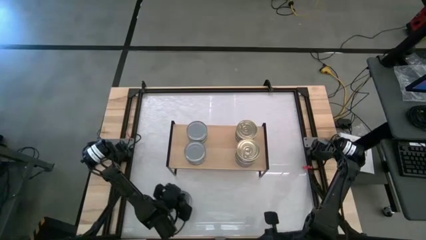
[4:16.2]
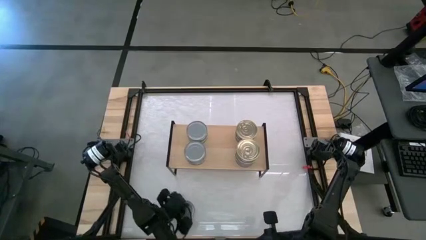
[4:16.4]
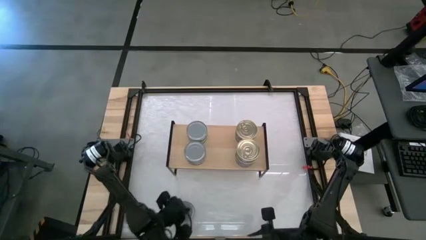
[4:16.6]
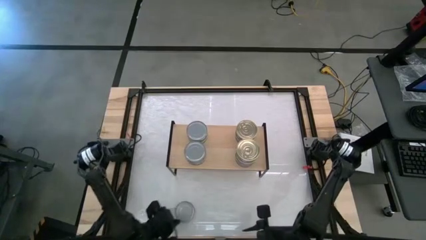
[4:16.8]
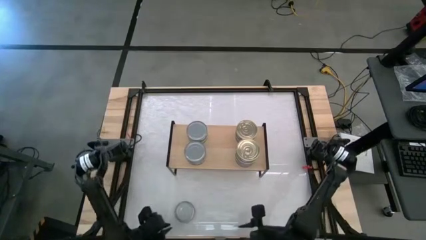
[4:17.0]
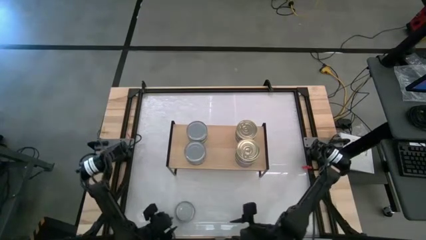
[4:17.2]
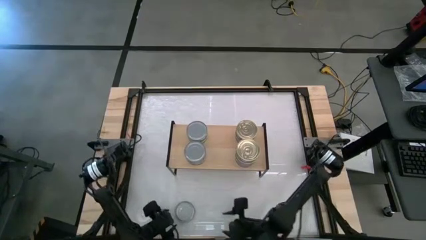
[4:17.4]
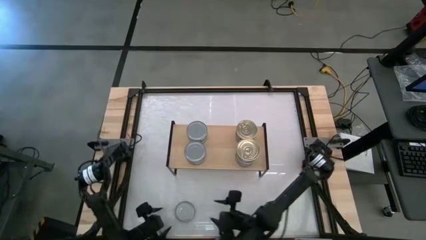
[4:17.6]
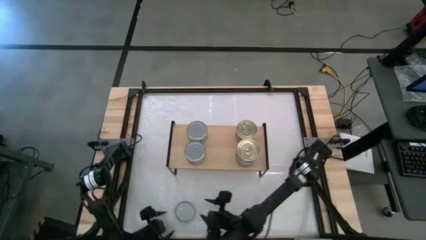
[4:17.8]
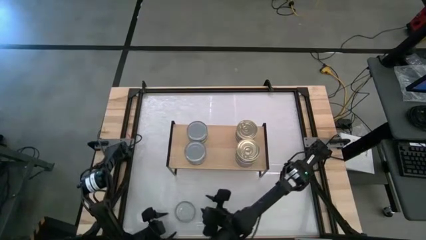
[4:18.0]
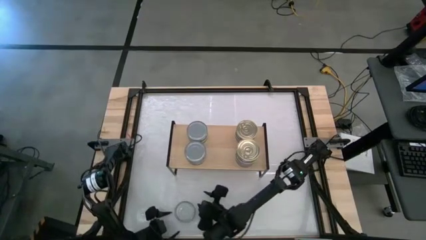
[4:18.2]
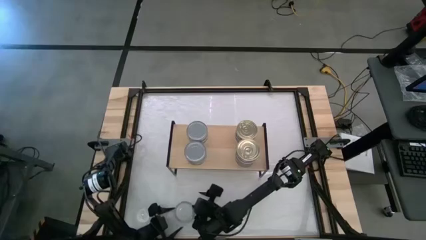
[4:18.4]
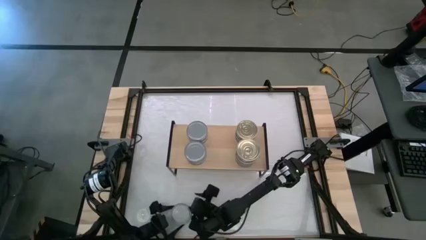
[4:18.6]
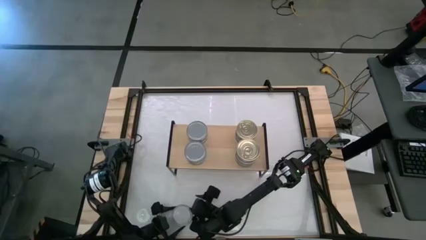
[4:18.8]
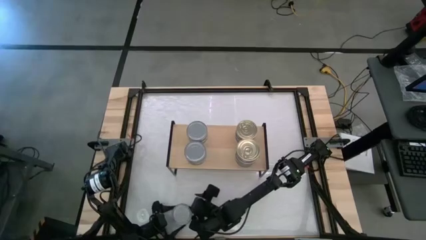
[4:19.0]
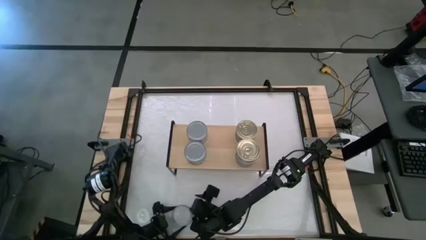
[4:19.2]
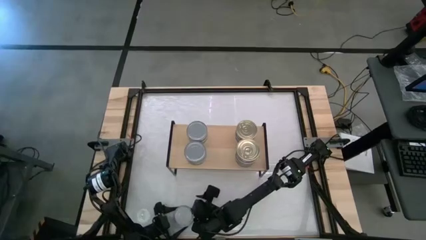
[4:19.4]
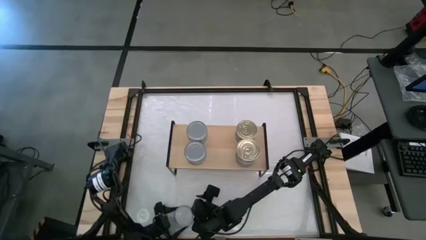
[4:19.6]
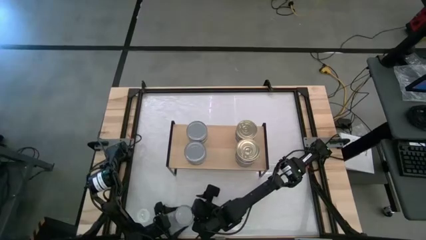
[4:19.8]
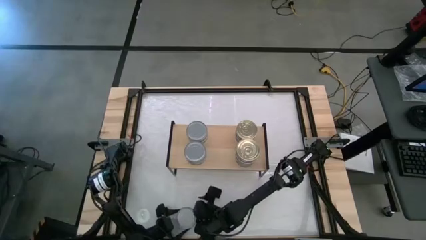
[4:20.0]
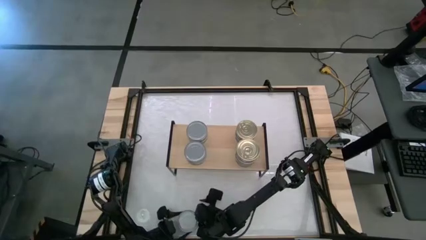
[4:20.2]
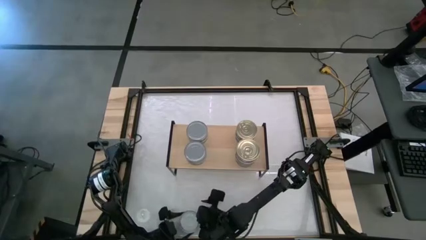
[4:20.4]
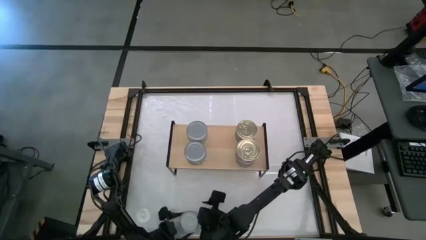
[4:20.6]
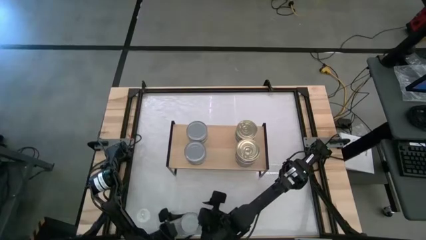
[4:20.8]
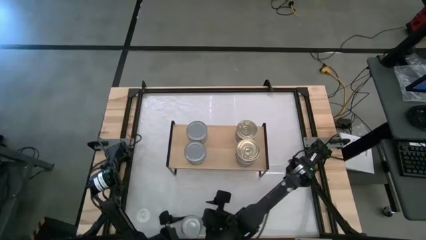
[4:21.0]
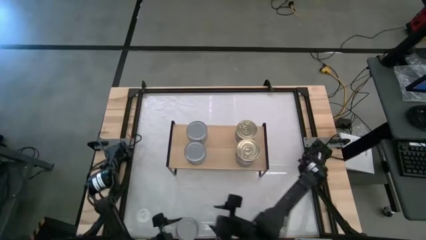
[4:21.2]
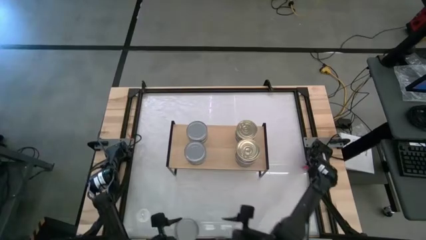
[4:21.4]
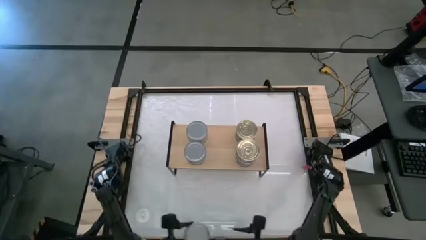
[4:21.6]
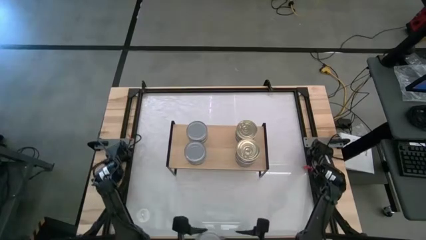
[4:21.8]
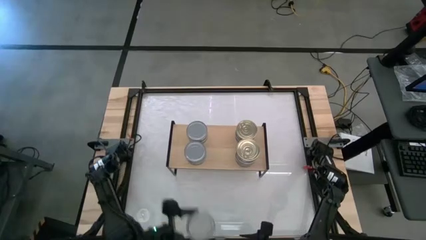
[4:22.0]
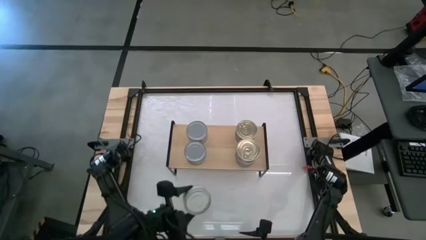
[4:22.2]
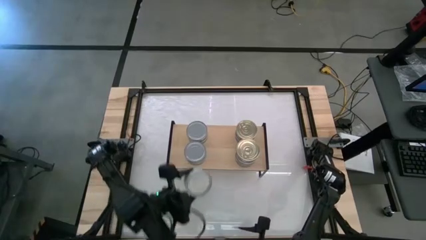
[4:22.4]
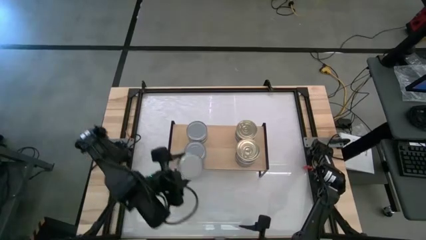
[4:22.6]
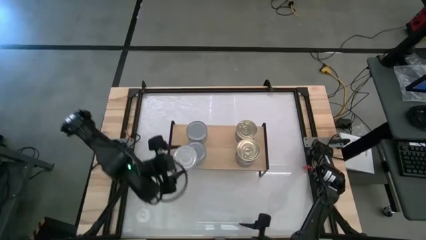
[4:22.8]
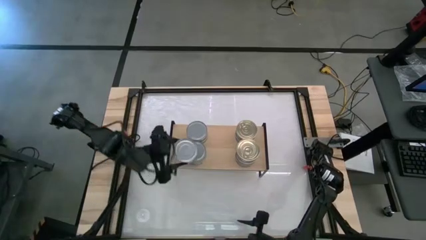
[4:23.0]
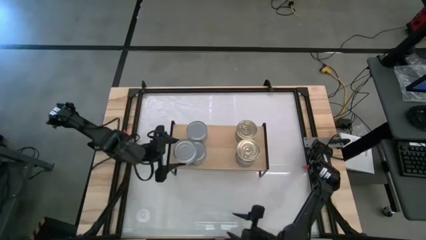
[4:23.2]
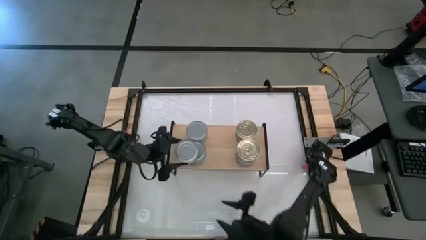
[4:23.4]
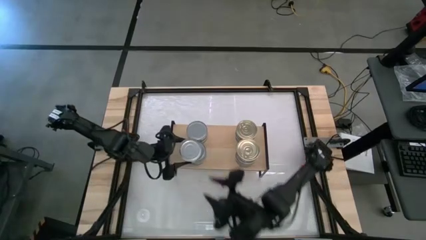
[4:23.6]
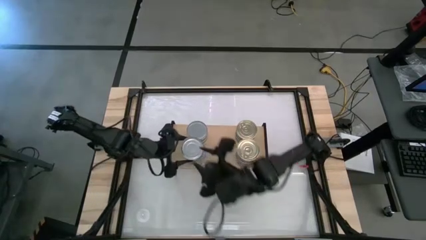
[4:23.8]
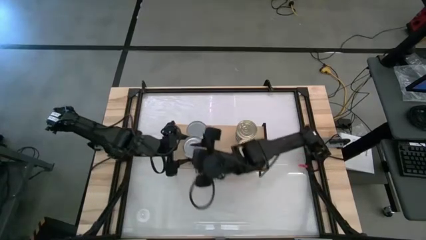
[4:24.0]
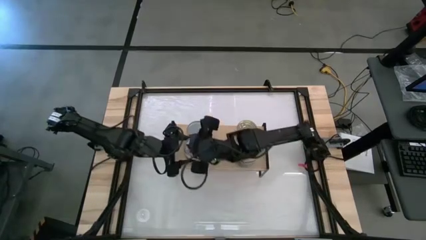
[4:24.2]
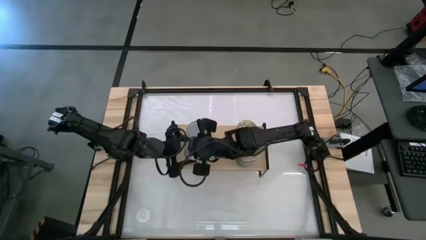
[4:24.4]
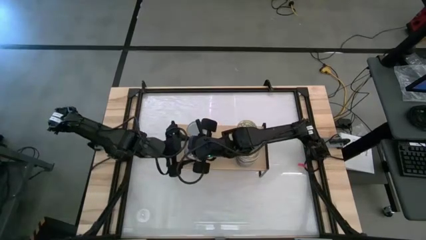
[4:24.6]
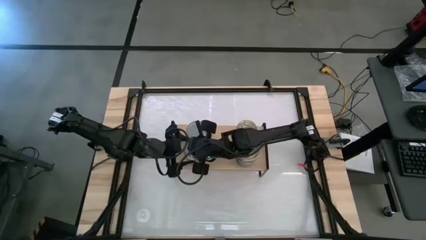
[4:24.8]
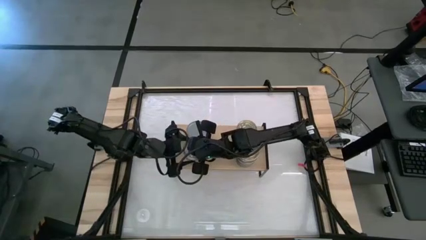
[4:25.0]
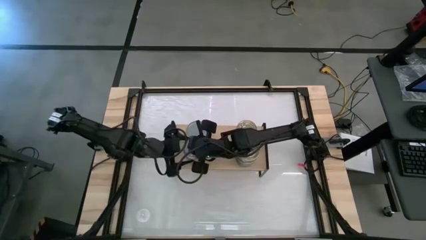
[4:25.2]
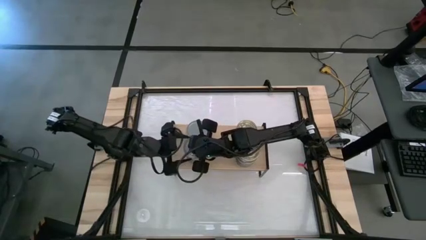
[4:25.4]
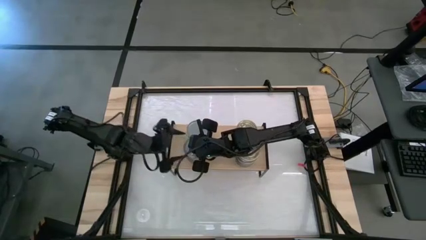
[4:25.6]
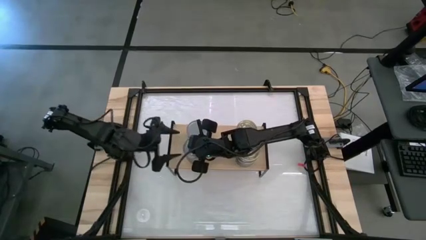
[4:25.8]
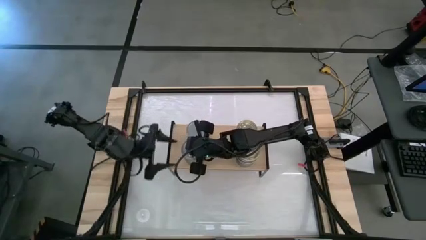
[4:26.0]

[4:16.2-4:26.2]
Task: Stack canned seafood by type on shelf
Stack the green tuna can on top of the other green tuna can on the shelf

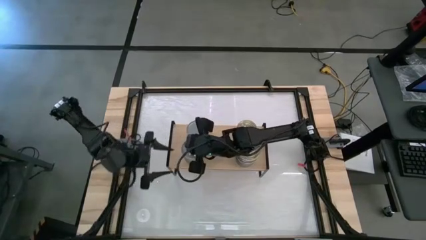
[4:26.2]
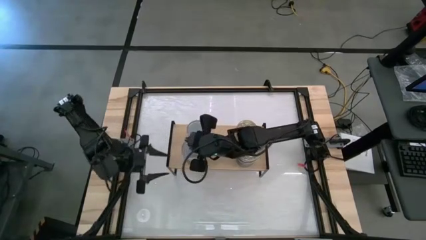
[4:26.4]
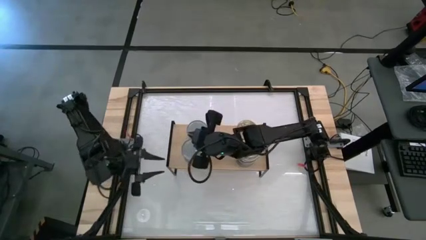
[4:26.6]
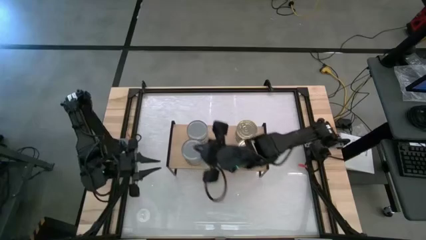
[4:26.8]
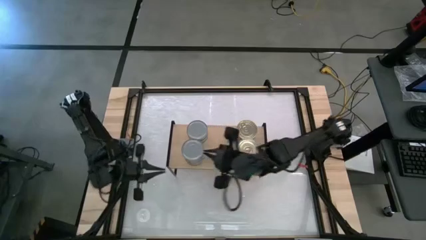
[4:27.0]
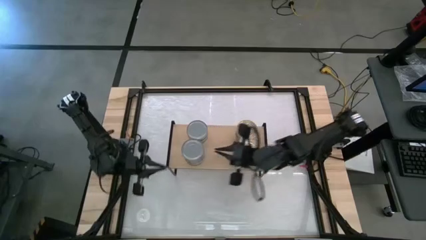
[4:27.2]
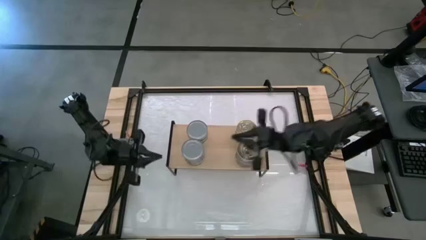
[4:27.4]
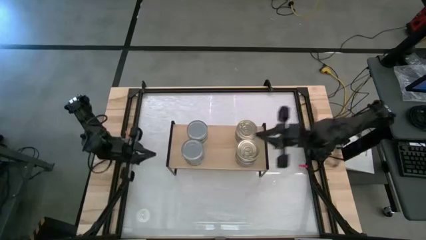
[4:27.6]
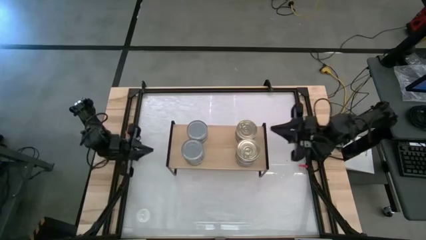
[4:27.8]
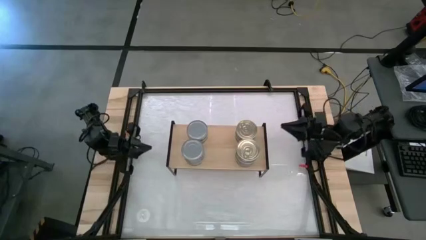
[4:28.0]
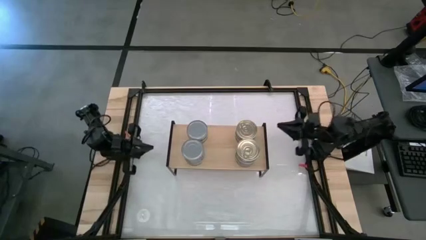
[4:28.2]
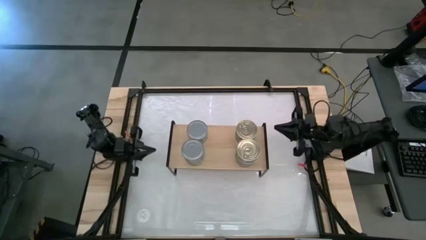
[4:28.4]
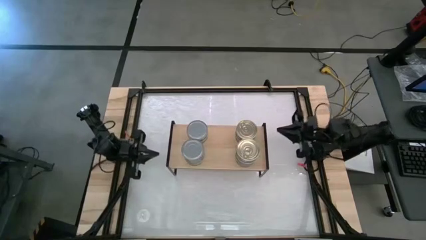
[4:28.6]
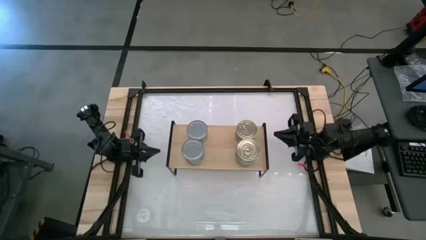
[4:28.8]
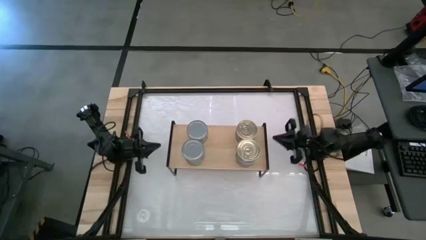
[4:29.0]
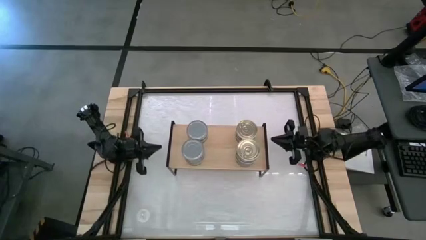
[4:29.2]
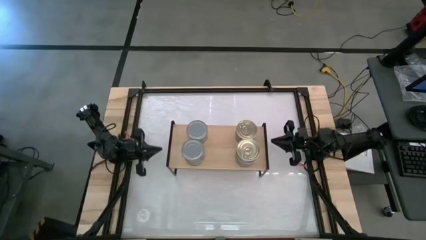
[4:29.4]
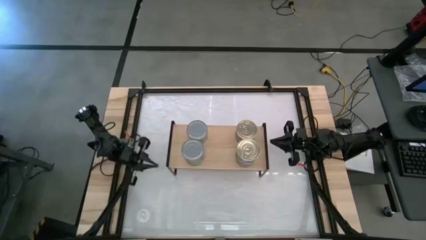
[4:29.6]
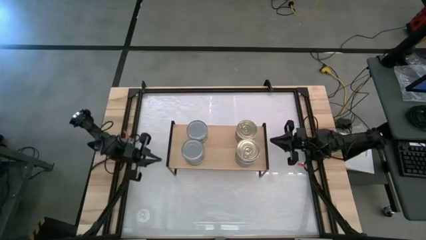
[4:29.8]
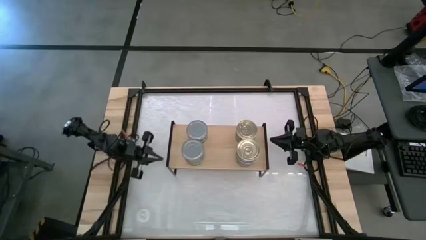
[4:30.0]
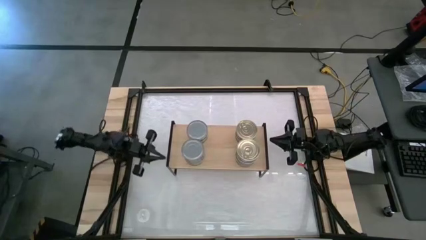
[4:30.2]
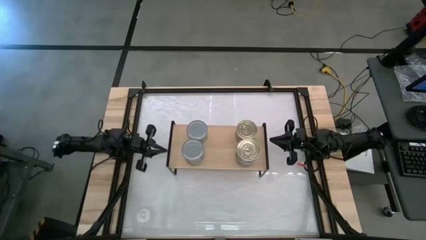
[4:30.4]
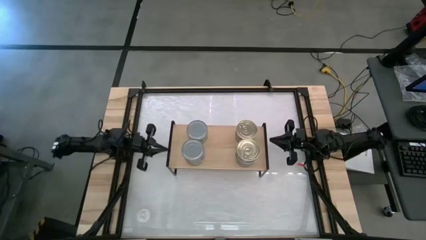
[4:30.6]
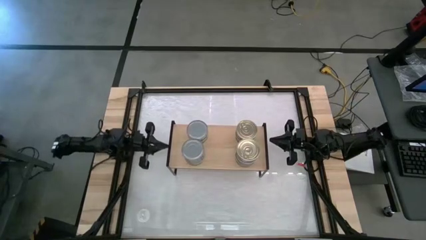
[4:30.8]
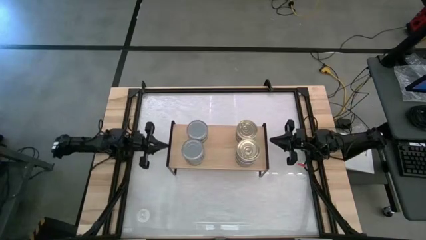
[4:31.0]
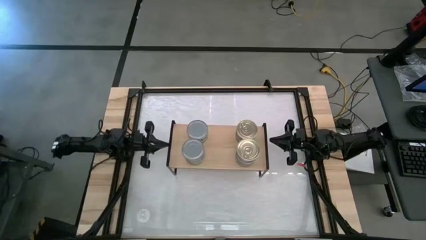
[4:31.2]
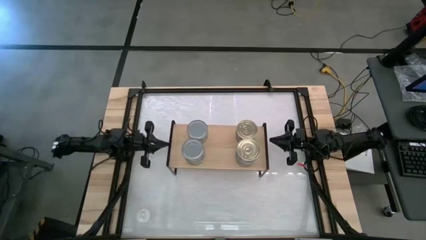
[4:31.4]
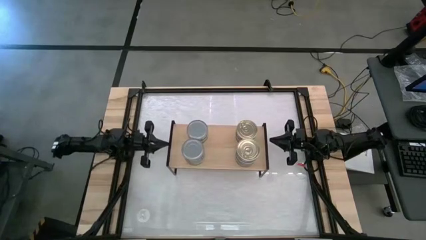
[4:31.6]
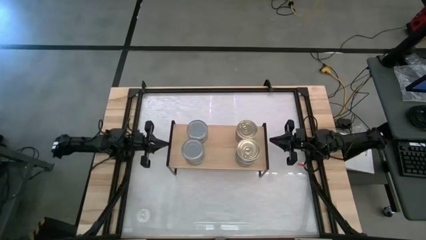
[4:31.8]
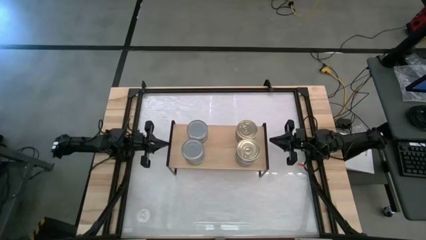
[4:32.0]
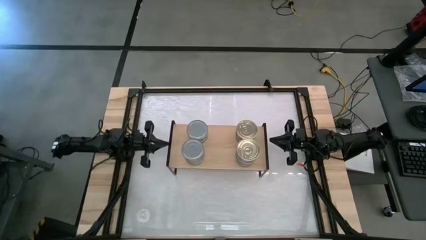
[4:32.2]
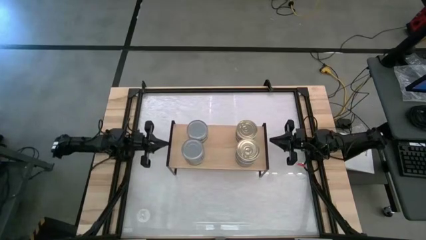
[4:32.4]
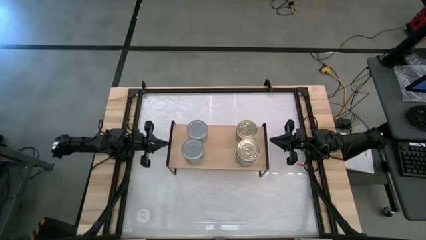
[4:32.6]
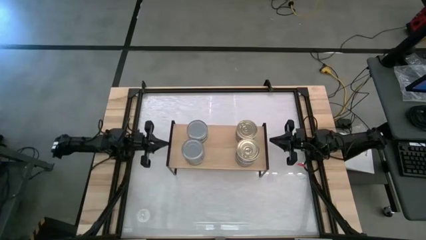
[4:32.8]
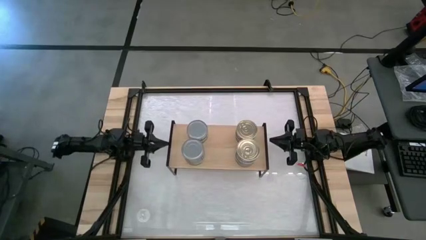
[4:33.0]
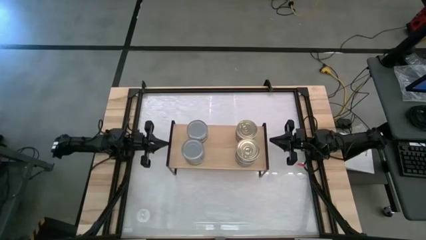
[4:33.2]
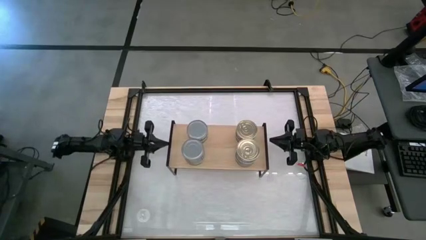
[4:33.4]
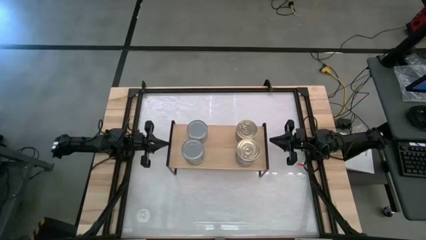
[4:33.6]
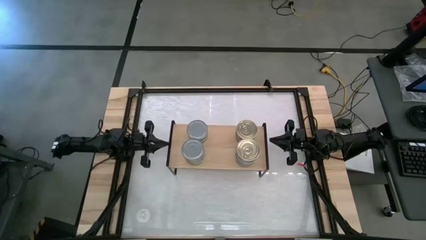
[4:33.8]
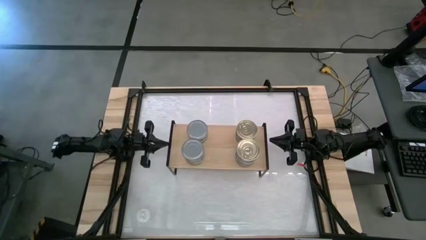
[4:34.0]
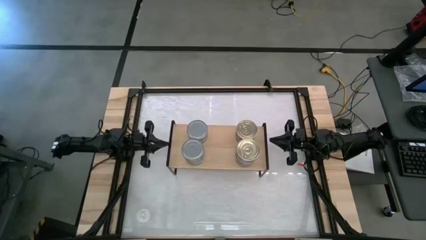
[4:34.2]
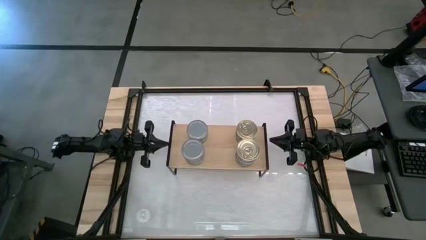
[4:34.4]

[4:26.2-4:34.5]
Return to Home Position
